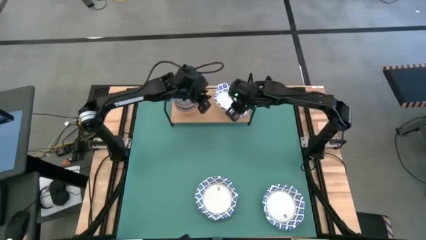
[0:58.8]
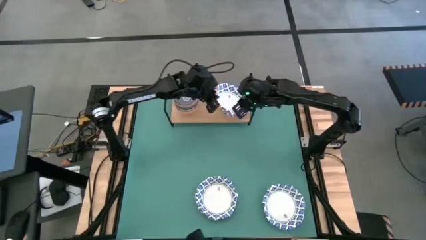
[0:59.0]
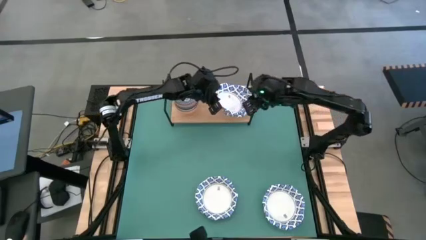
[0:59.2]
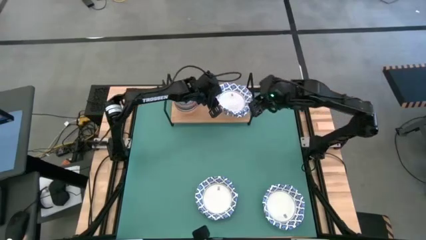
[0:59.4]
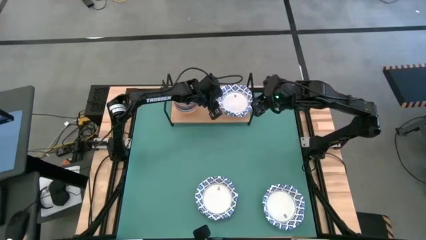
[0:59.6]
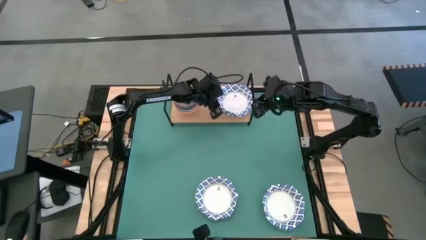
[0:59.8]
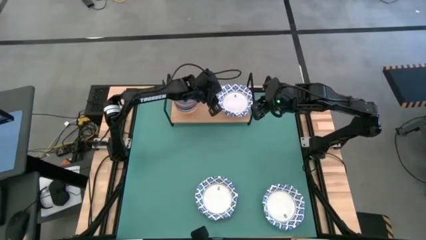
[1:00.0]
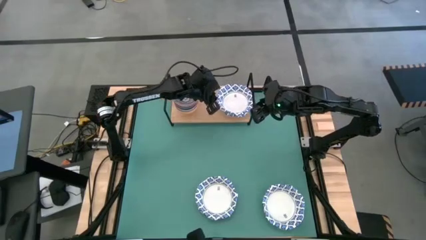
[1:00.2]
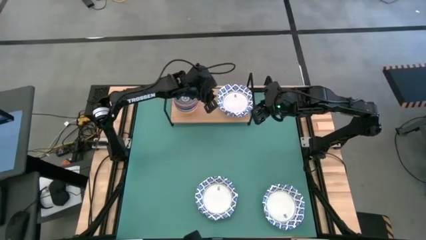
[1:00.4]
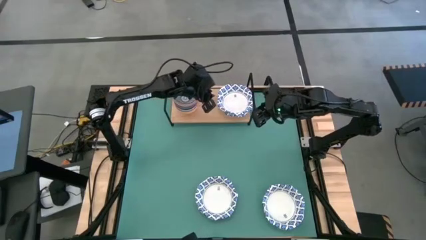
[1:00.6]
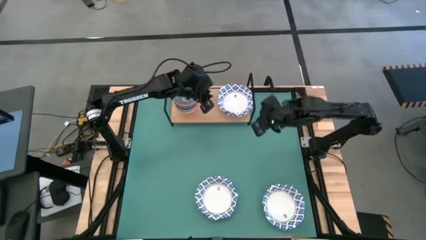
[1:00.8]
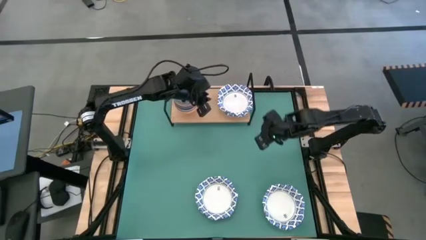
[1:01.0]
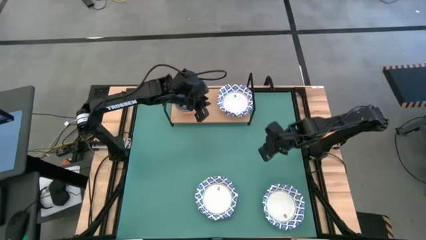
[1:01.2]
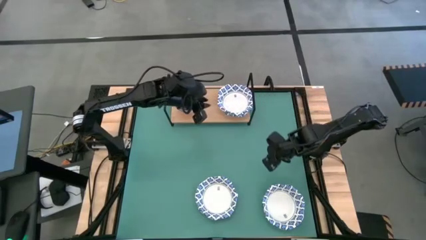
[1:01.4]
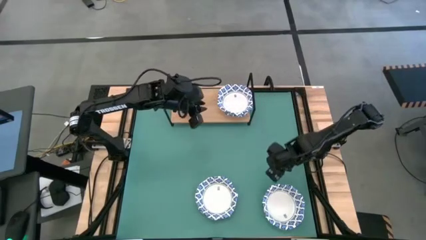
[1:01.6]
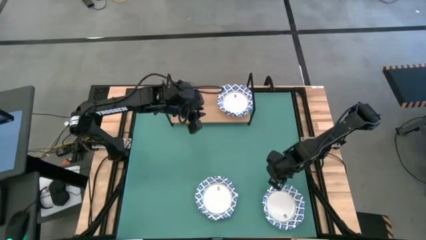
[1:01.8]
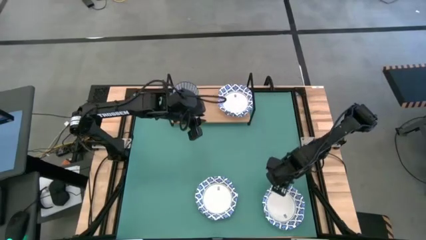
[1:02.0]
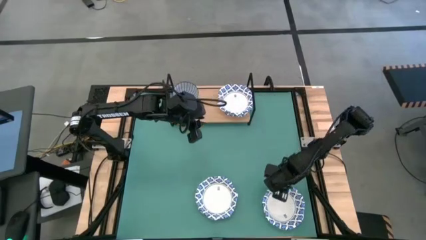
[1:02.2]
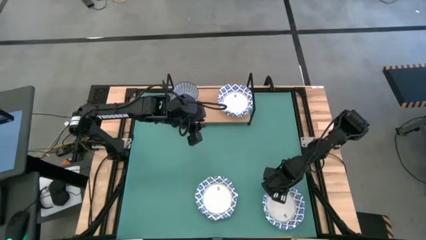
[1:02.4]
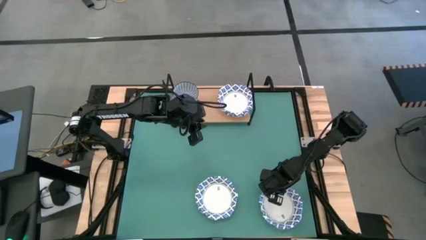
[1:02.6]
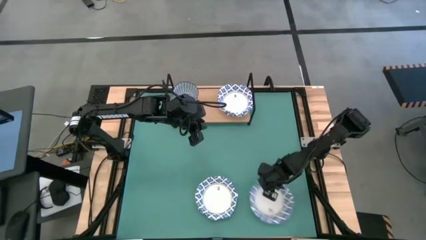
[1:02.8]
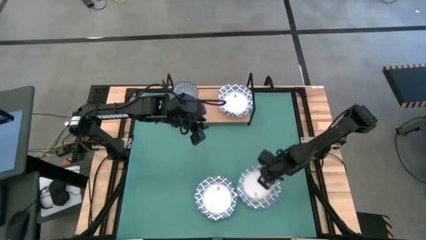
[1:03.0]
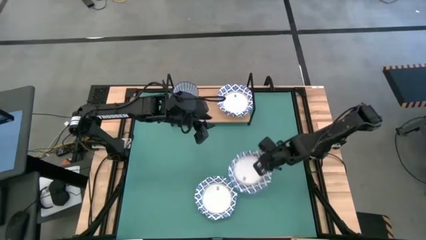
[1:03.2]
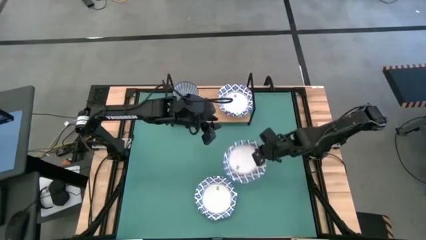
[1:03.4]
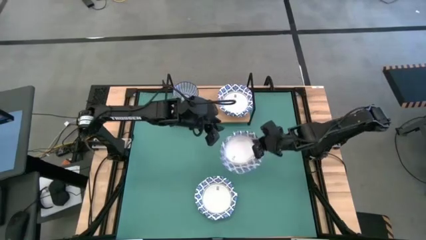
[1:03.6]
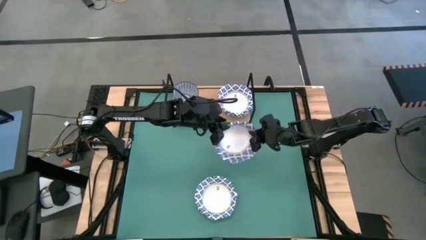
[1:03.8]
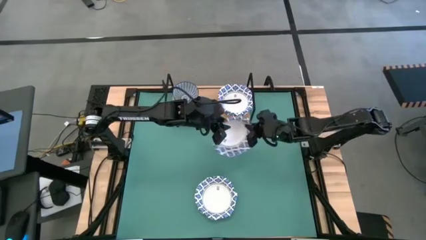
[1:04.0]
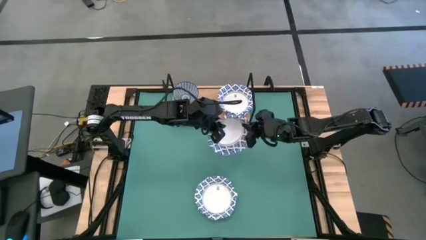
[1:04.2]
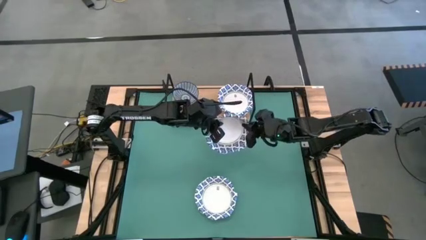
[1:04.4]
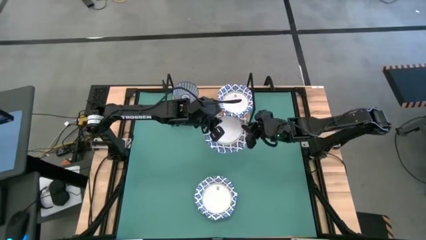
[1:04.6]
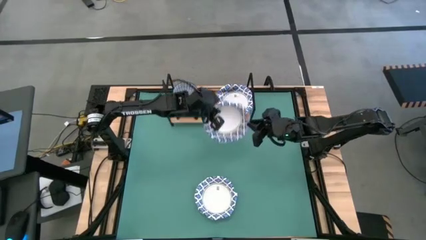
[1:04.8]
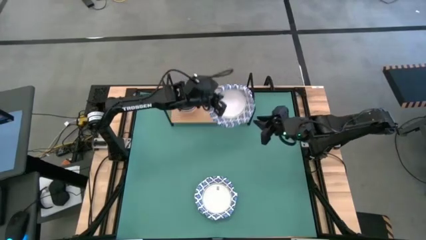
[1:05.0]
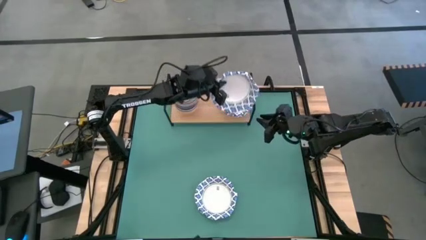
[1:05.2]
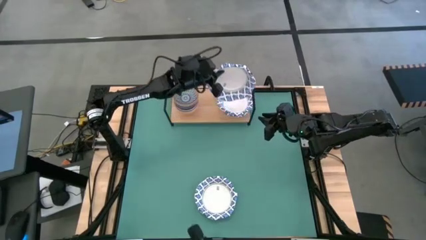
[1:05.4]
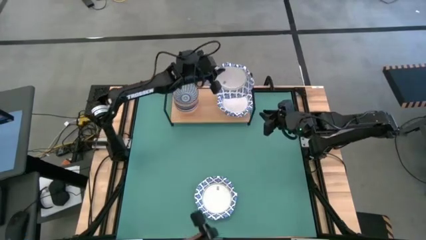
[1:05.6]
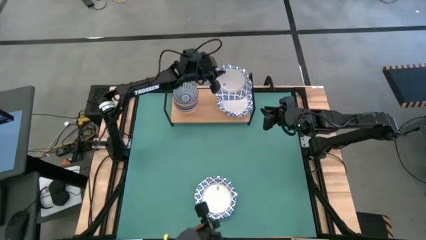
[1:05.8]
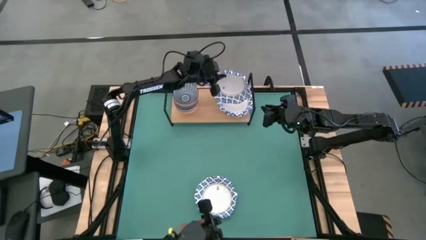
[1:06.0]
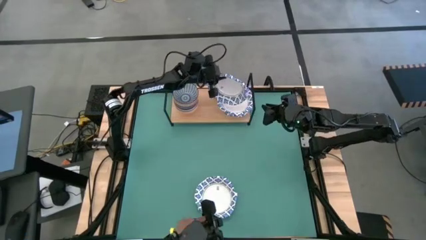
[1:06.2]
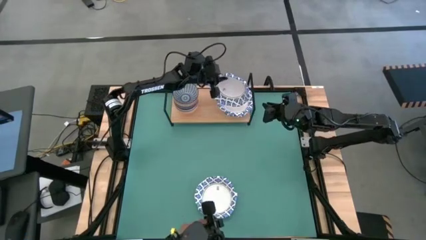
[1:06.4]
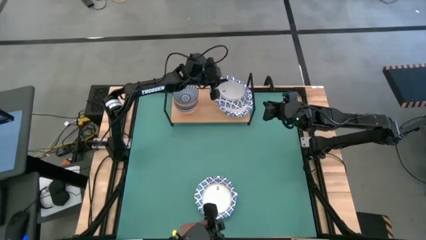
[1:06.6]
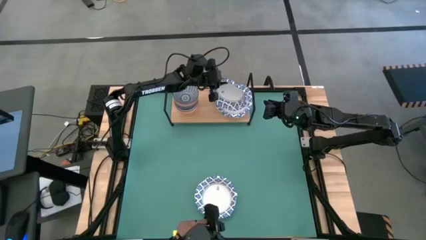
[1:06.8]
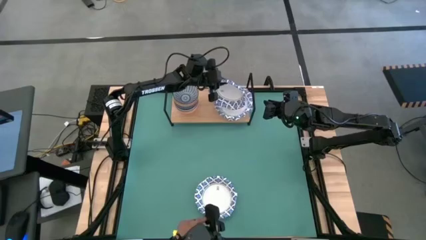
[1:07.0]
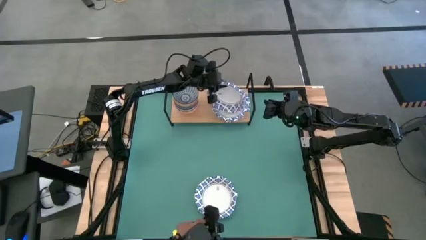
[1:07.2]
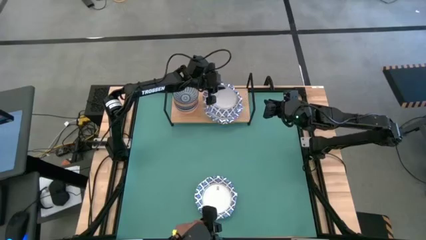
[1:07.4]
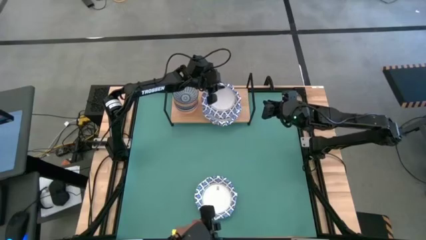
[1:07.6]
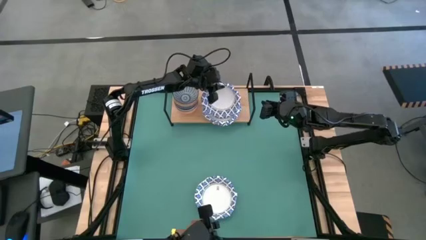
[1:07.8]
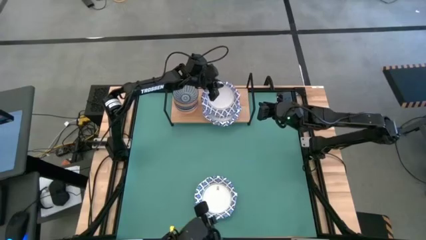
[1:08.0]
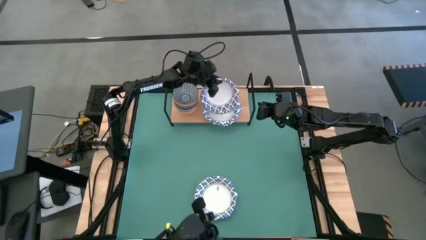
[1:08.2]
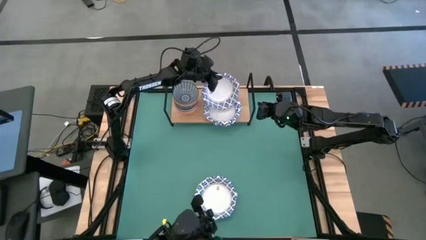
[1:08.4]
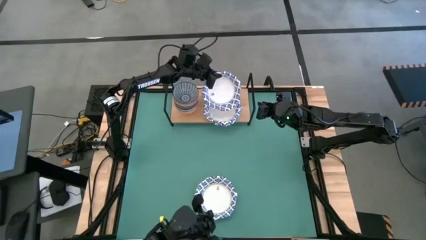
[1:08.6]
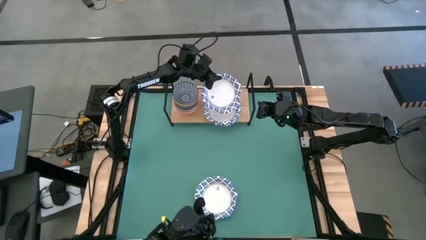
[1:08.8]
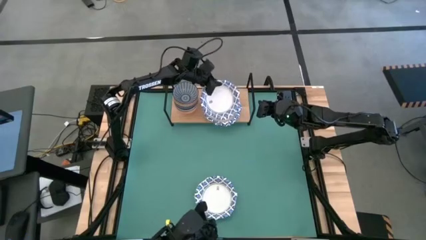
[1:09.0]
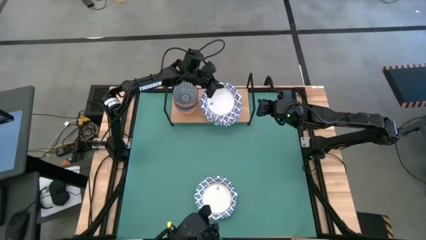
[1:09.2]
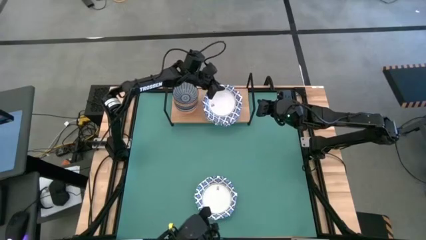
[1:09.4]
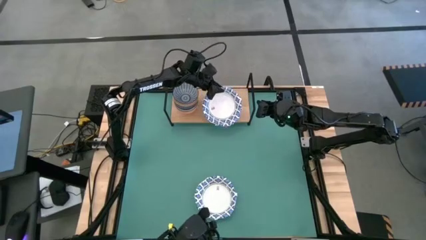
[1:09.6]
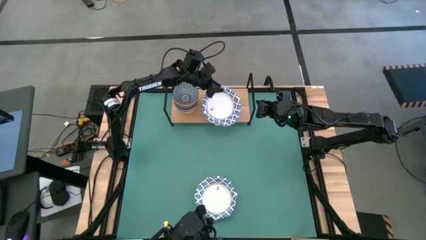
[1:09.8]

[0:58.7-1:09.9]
Task: Place and stack bowls onto a shelf
Stack the white patterned bowl on top of the stacked white patterned bowls on the shelf

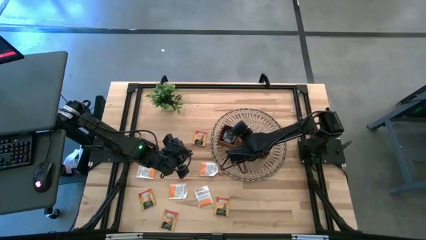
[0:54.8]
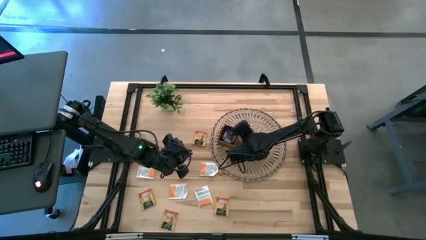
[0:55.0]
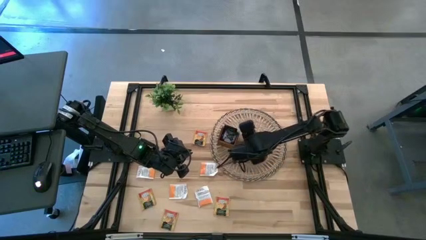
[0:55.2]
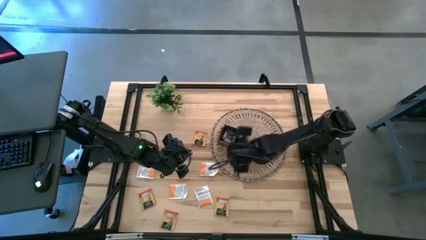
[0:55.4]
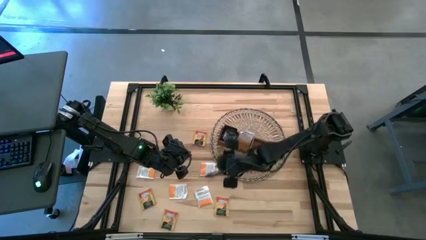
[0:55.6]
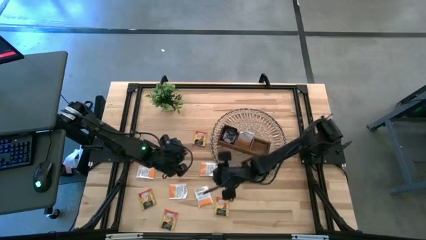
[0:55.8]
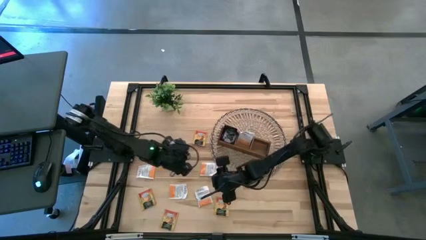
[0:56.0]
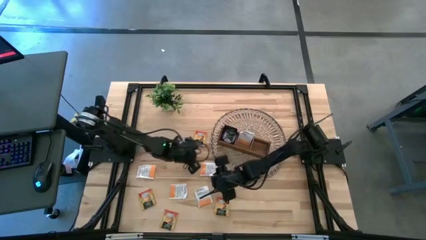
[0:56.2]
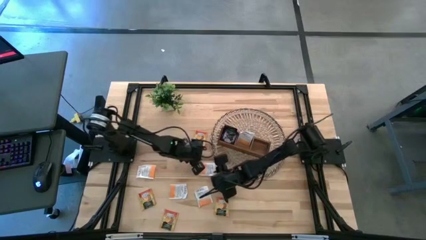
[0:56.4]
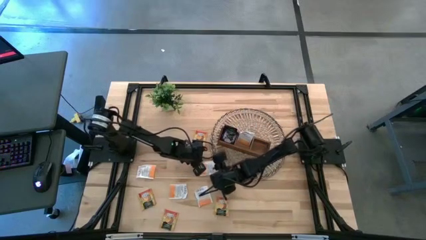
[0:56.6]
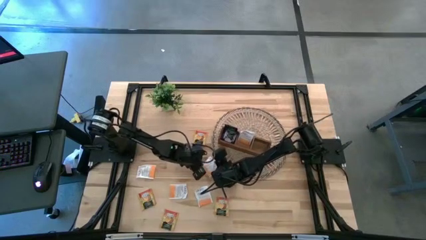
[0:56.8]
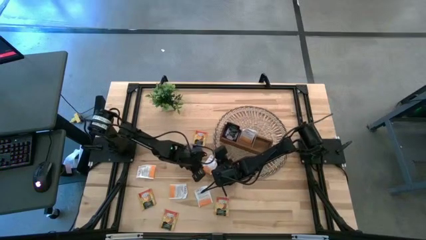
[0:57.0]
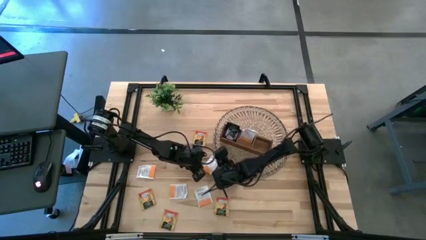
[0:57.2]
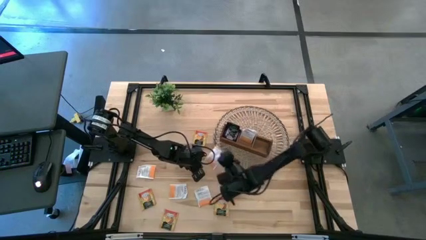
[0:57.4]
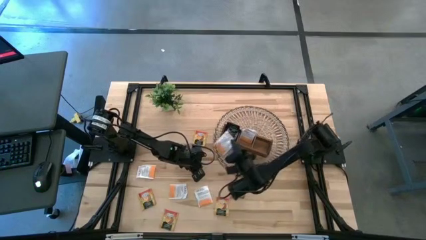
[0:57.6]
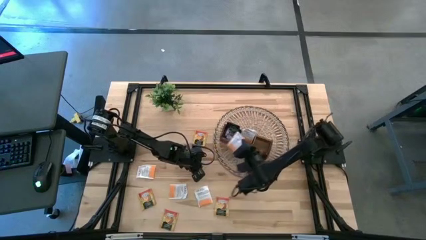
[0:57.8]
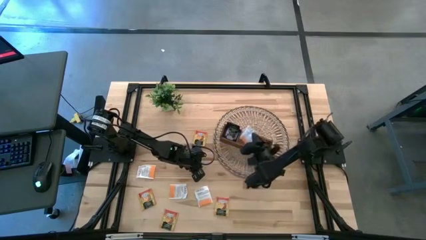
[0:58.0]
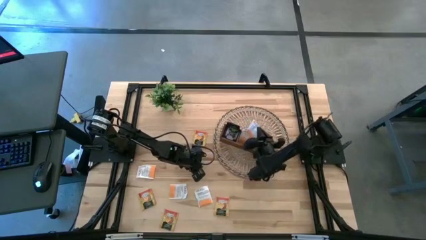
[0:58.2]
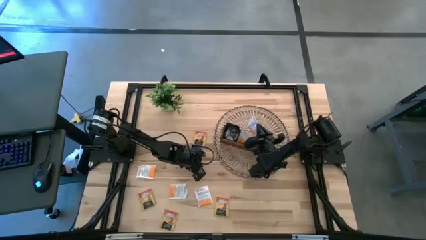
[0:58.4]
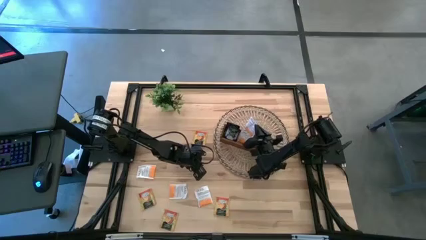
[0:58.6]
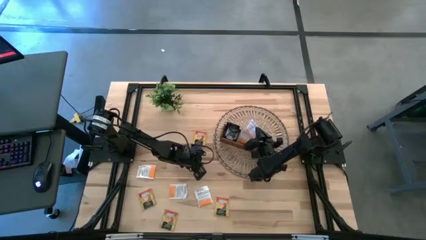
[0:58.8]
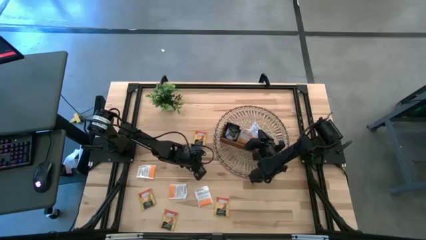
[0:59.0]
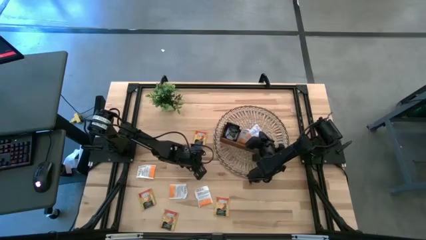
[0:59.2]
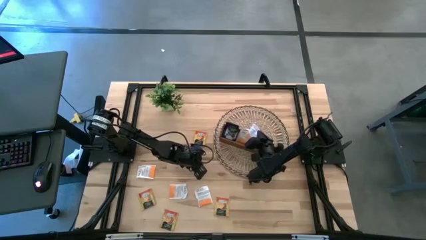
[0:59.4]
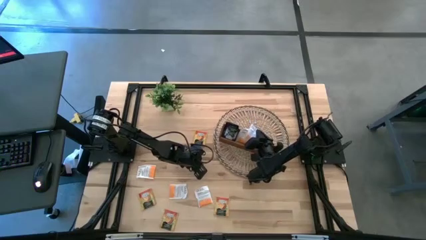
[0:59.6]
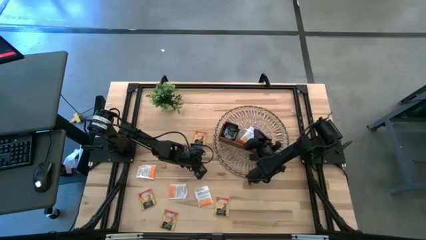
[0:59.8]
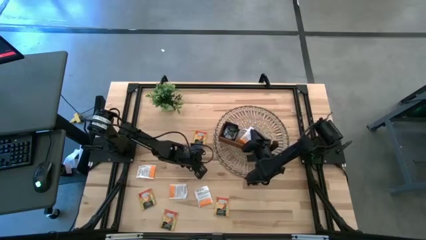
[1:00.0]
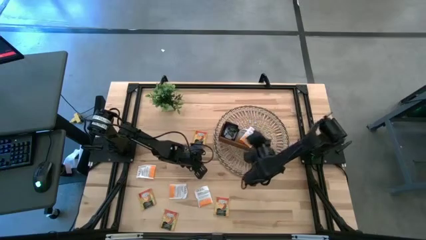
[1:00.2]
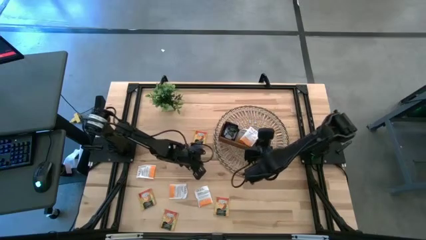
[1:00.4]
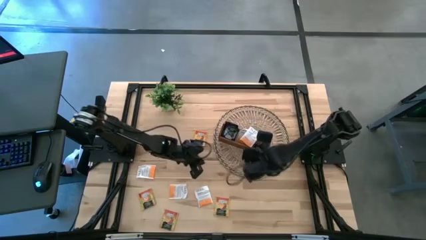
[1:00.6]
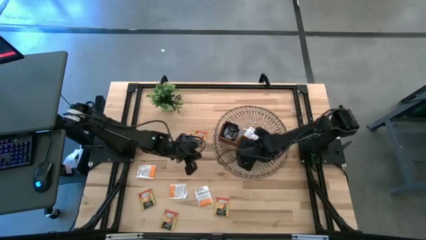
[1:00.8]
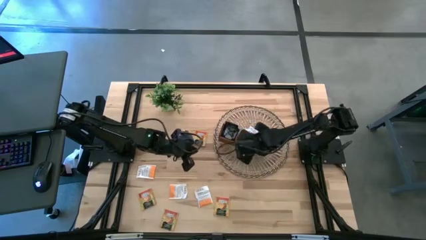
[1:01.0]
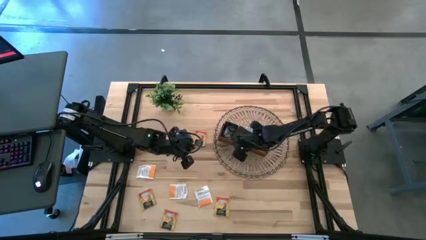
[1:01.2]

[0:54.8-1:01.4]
Task: Pick & Place Tea
Put the white tea bag into the middle section of the wooden organizer
